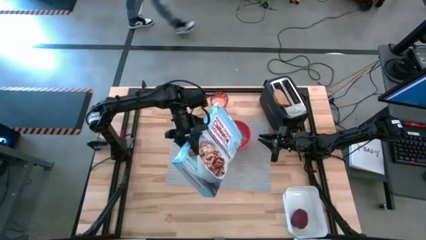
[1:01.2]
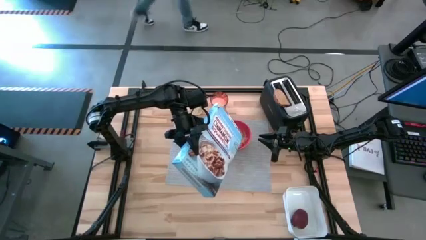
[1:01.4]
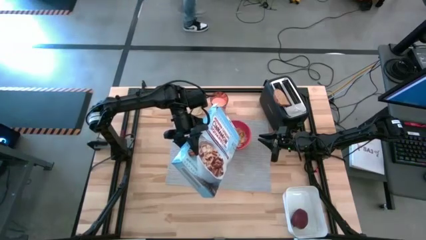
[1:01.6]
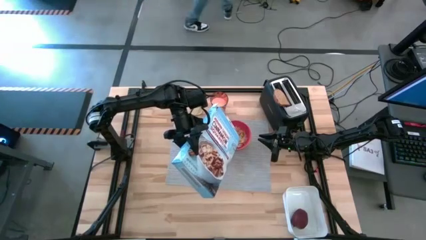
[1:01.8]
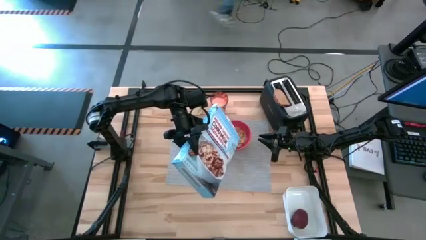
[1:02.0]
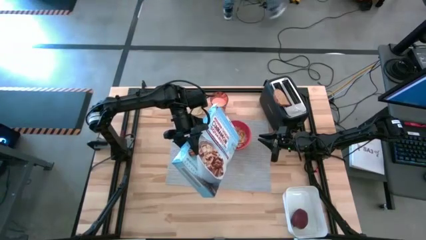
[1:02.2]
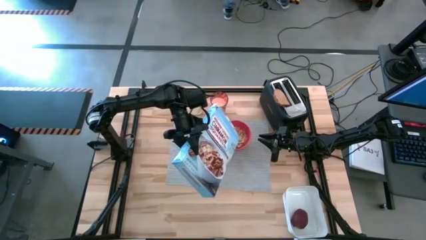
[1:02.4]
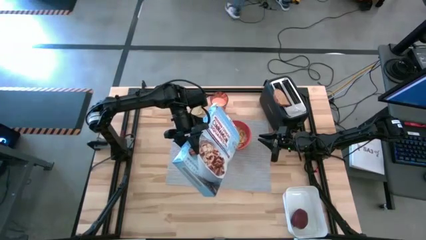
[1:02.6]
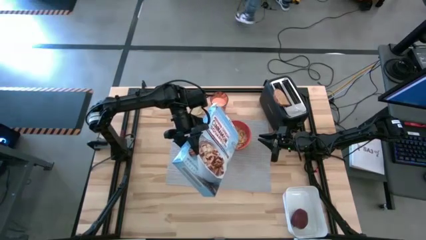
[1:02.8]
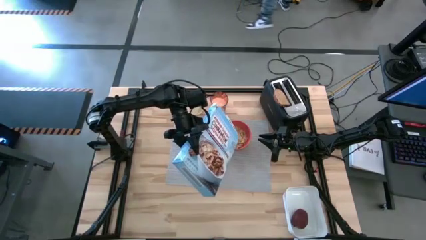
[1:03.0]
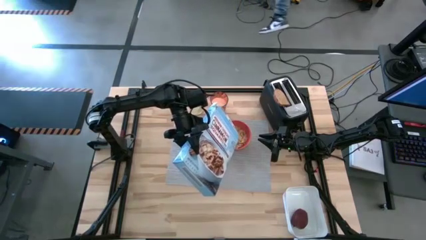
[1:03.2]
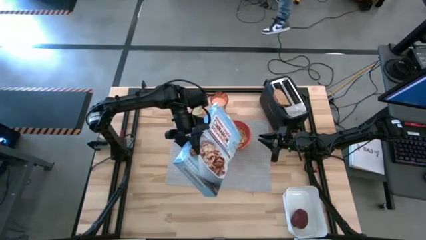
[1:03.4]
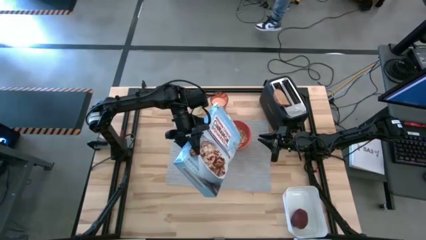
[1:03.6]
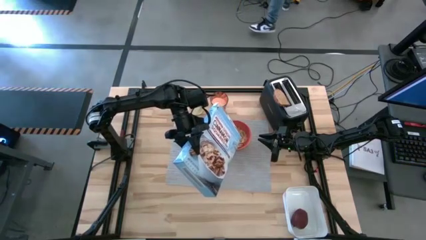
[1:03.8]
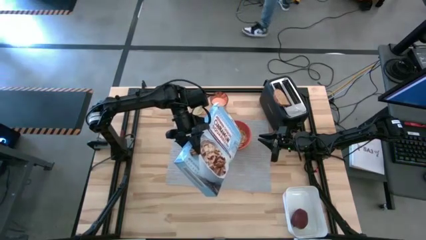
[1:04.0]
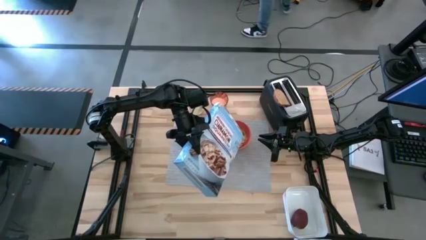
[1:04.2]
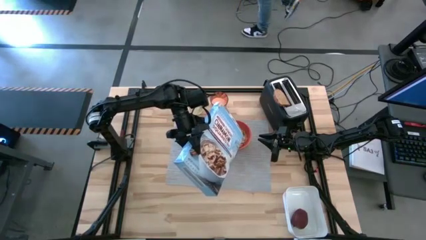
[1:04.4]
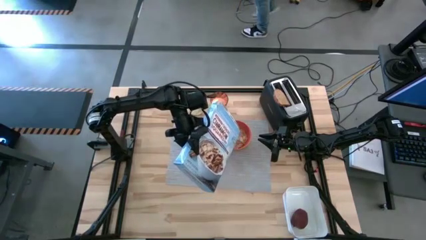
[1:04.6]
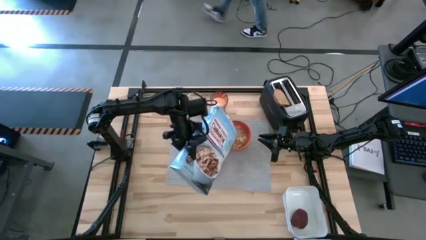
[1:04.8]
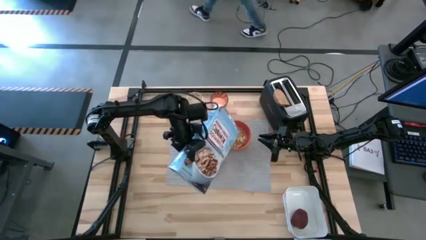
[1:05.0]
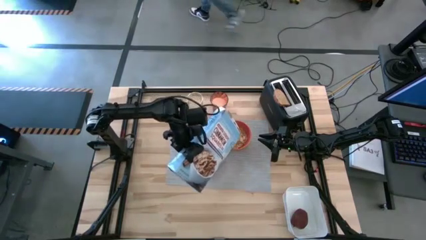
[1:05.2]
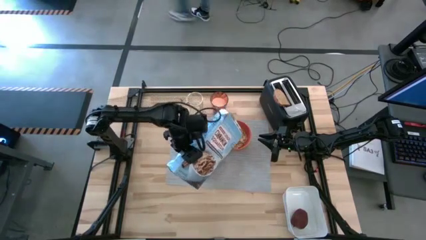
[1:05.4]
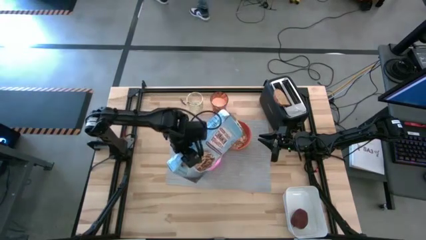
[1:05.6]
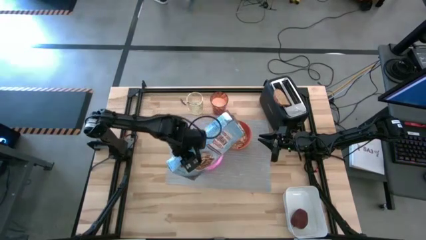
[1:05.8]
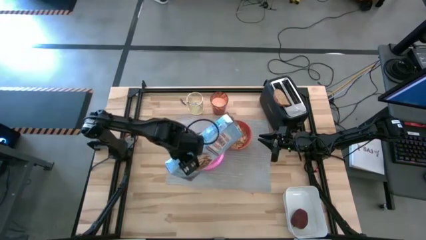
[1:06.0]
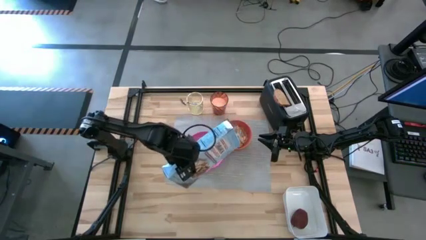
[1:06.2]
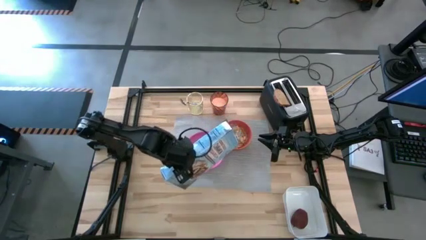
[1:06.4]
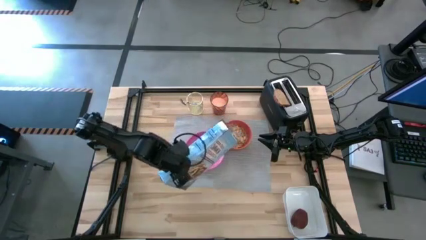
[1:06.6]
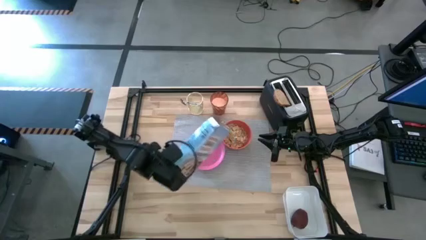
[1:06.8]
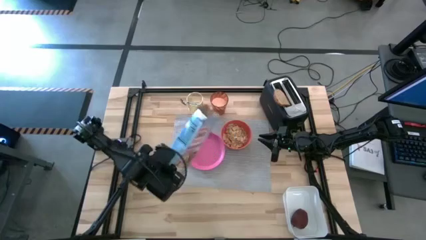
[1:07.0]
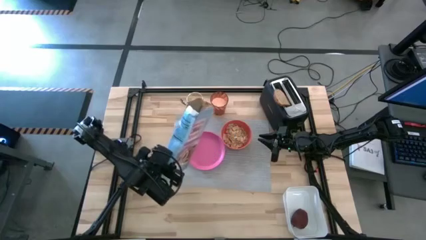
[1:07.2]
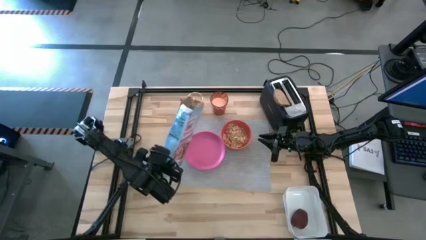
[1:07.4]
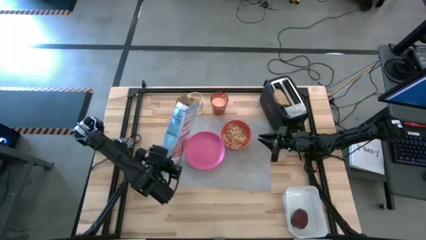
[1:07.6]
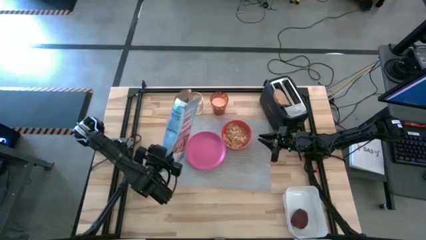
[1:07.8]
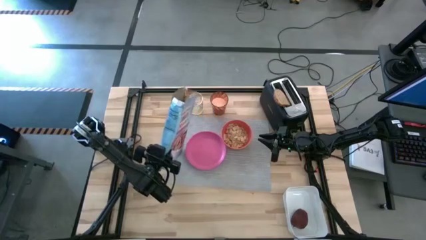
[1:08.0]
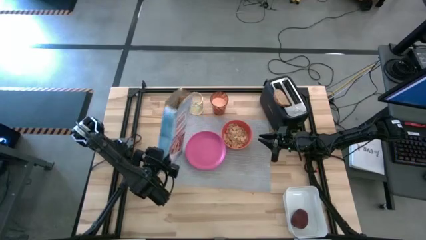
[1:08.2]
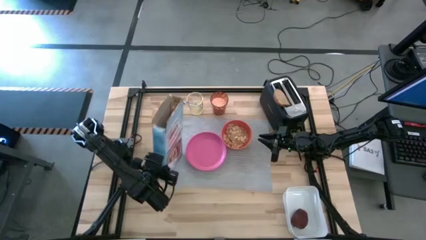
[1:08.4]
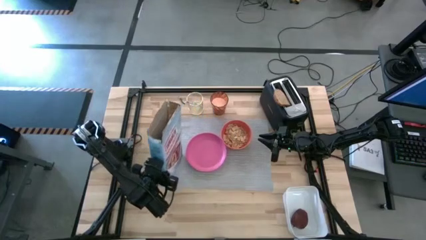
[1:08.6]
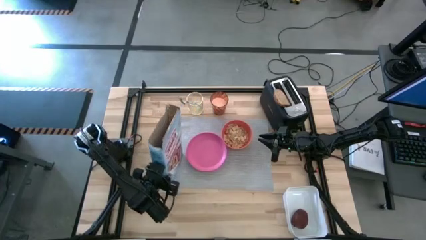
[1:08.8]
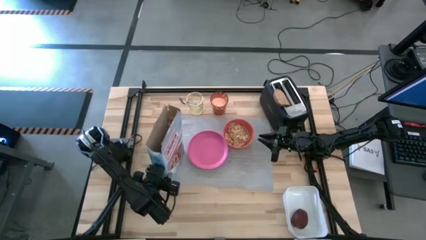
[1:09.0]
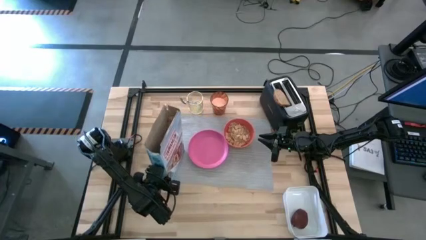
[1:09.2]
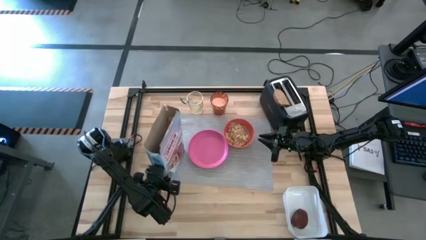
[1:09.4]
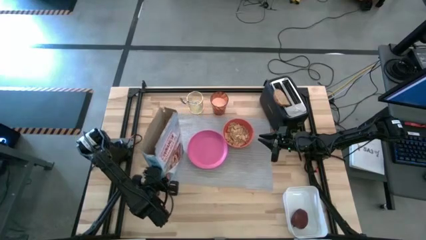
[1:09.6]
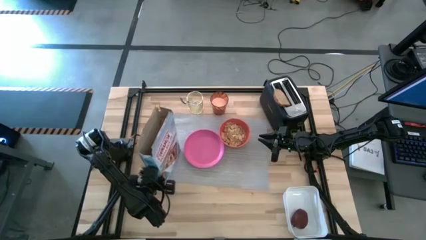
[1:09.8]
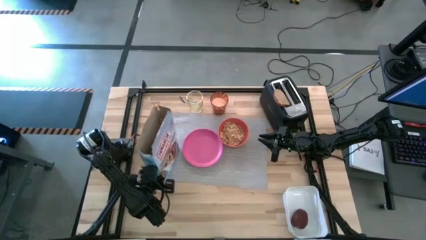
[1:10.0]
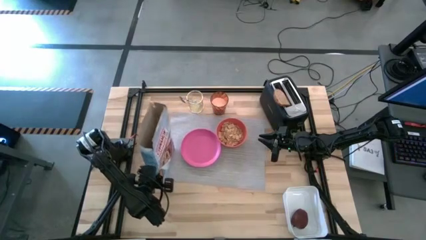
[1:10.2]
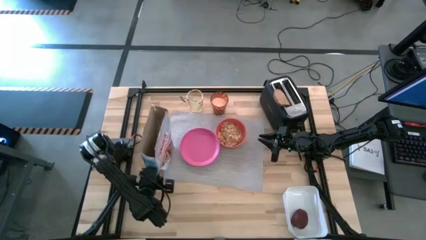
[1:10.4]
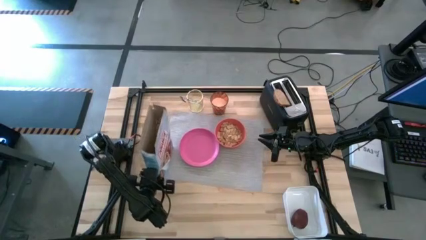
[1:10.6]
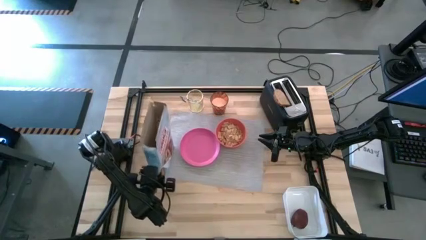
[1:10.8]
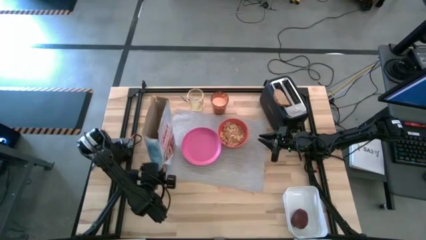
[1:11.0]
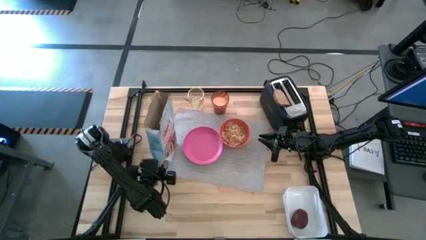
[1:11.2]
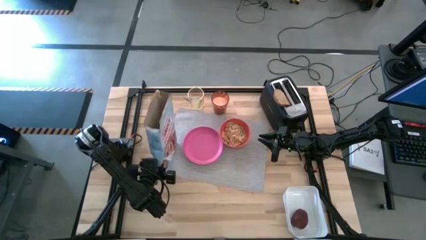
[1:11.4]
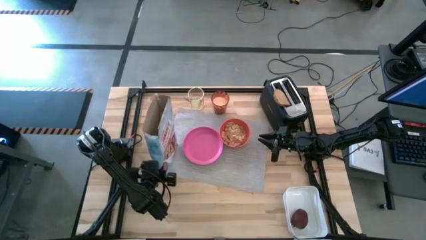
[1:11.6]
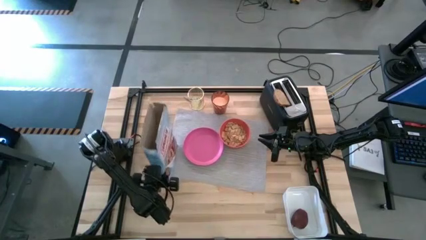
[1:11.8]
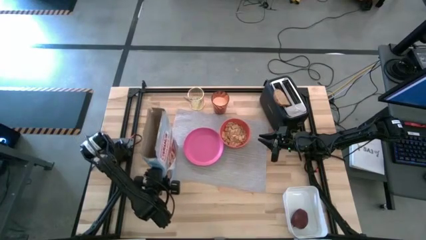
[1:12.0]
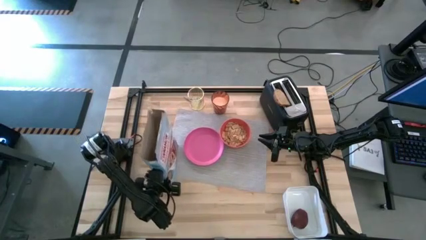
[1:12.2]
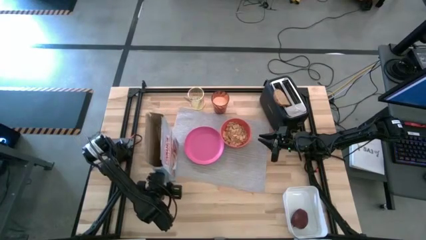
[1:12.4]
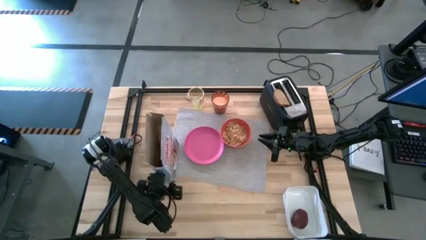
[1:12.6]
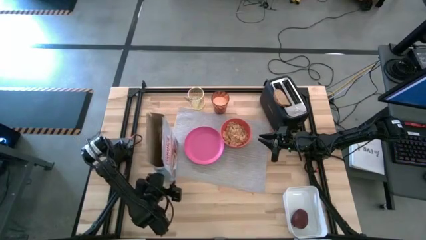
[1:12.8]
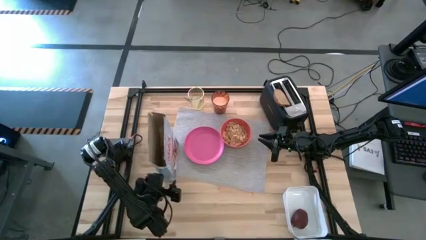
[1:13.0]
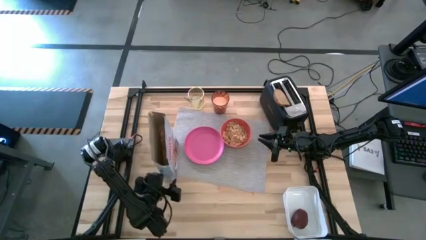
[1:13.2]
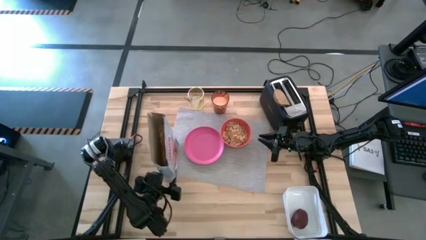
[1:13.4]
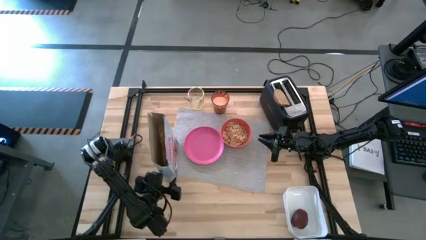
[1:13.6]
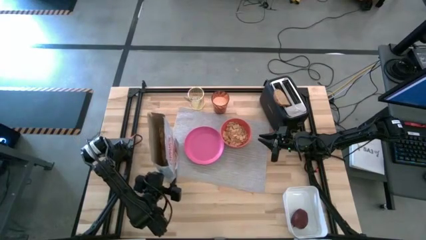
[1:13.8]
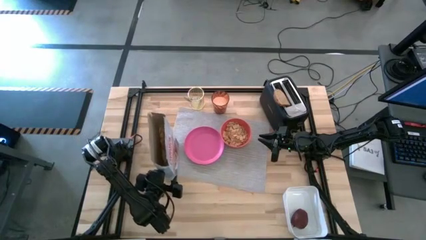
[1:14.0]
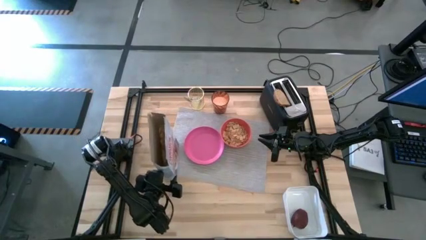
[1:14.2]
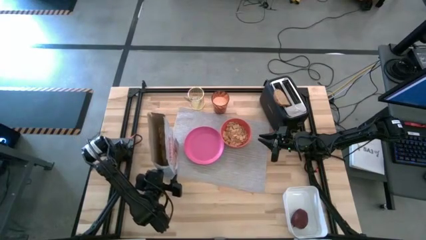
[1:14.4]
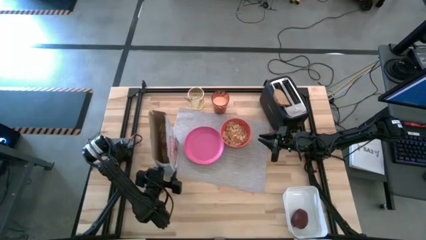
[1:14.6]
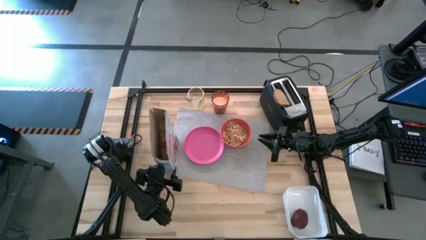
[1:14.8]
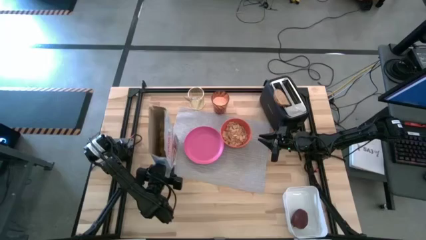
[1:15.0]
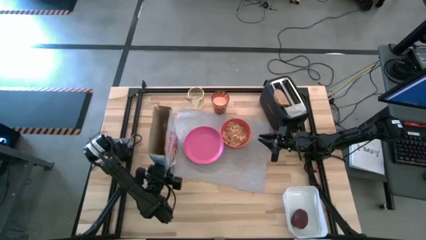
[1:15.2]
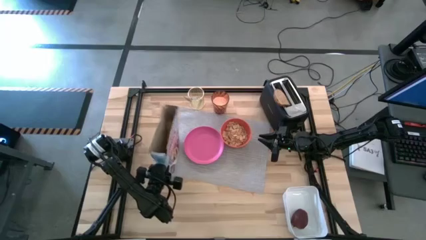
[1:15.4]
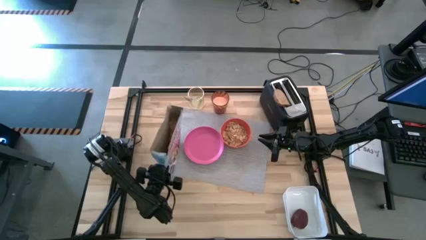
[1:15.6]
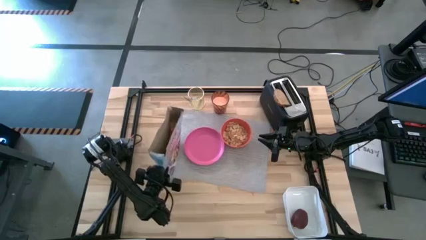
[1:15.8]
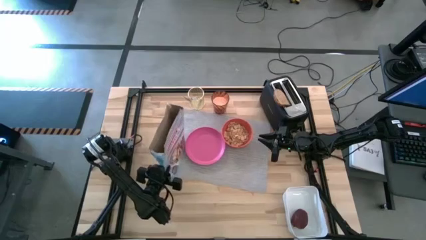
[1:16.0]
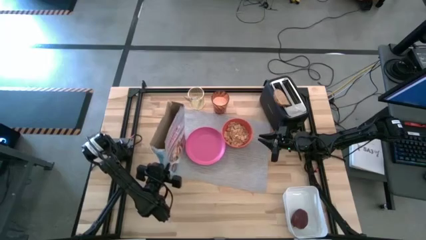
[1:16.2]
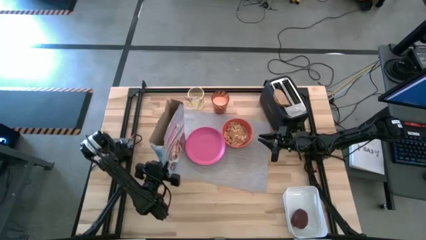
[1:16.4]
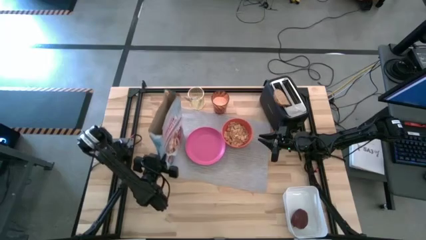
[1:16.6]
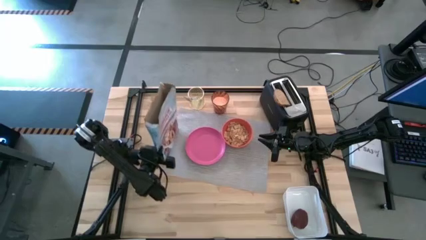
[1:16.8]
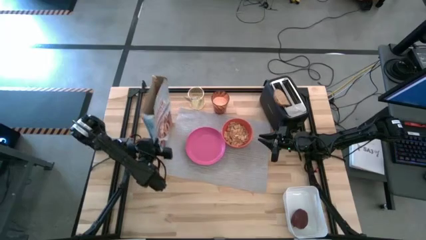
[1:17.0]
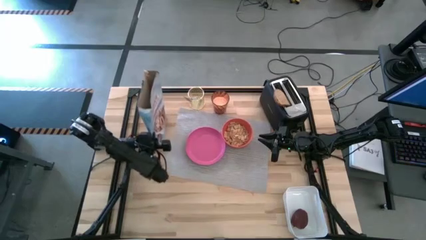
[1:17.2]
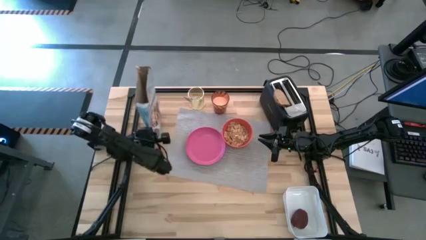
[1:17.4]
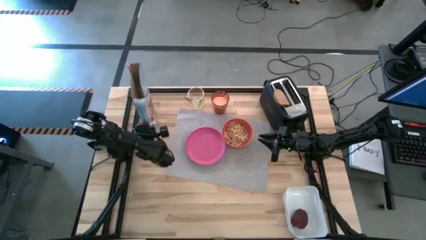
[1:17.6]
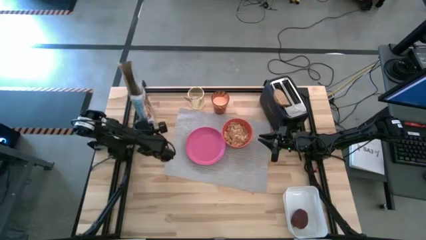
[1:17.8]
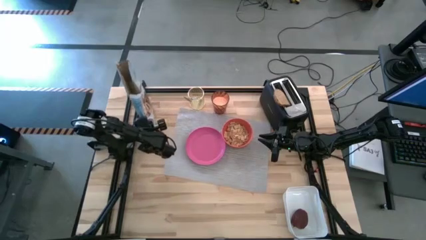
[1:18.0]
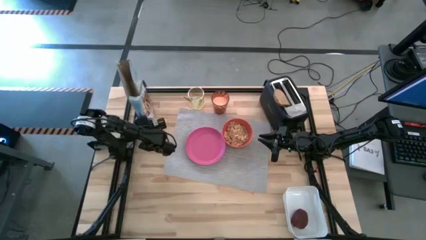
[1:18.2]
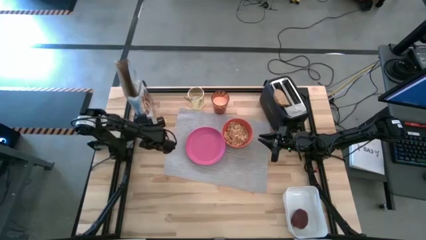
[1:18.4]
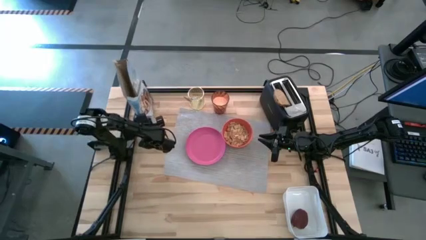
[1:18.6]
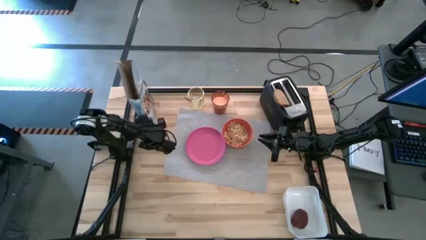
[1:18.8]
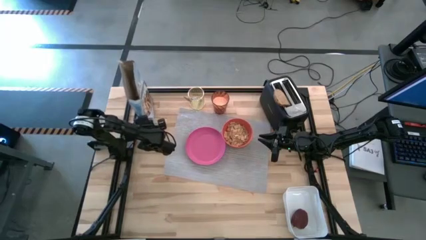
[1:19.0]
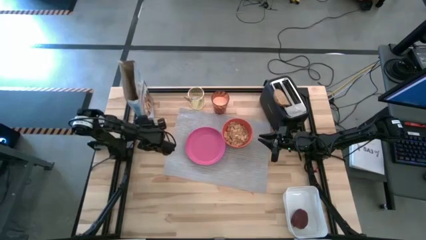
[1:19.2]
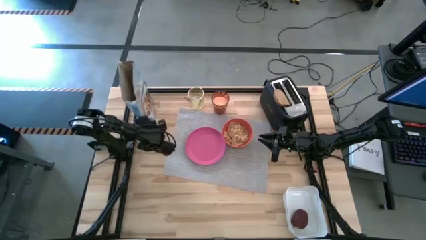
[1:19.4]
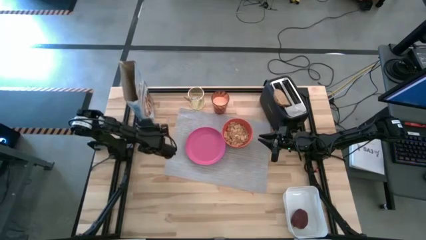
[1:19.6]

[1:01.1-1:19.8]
Task: Arrange a breakfast setting
Pour the cereal from the cereal box into the red bowl
